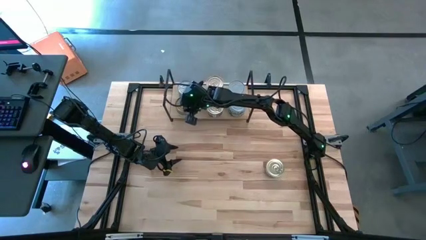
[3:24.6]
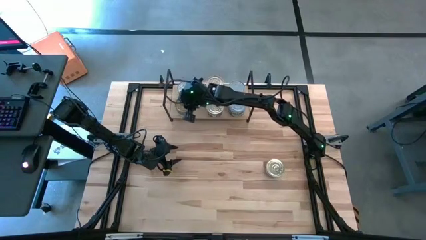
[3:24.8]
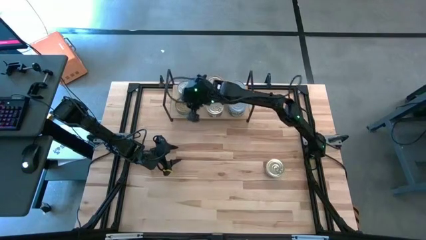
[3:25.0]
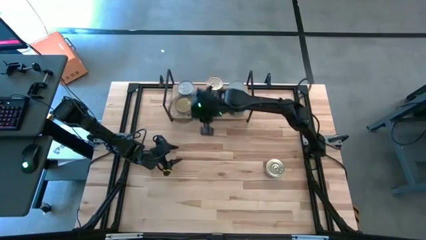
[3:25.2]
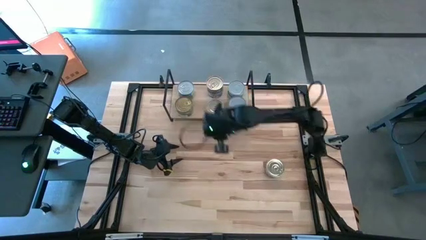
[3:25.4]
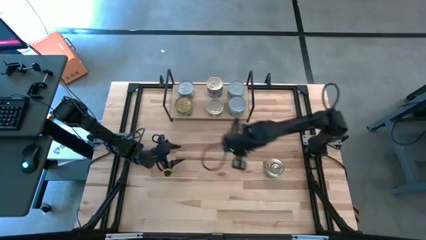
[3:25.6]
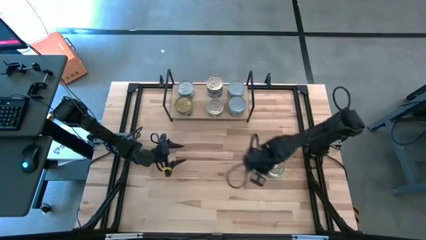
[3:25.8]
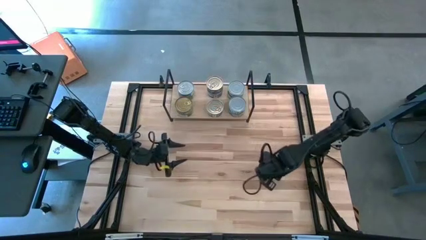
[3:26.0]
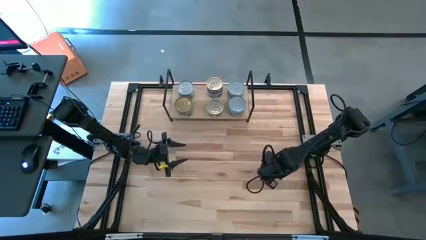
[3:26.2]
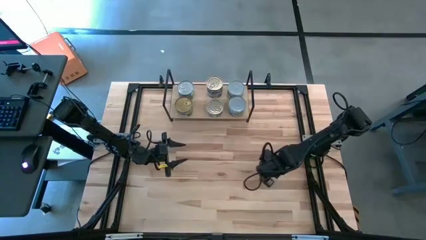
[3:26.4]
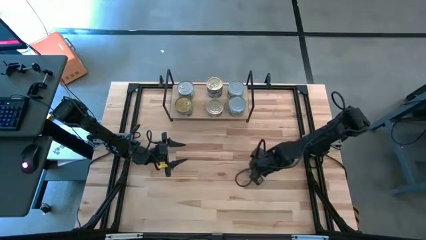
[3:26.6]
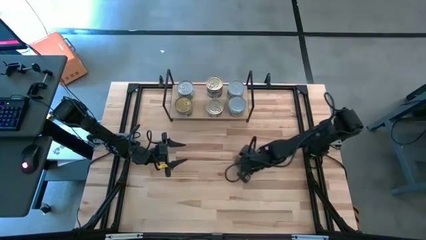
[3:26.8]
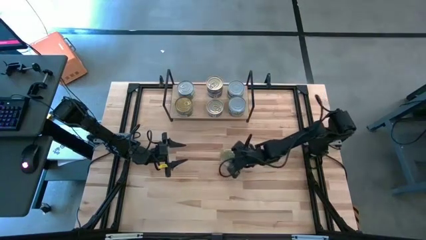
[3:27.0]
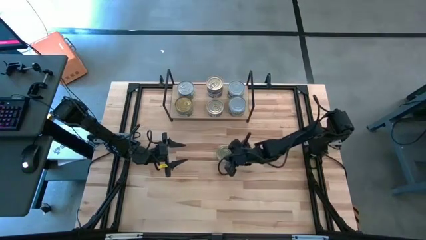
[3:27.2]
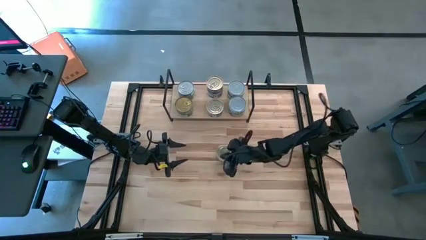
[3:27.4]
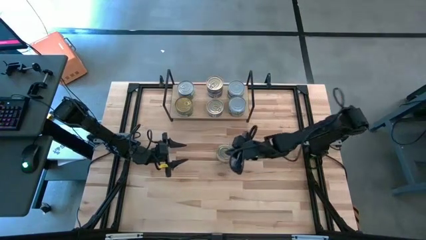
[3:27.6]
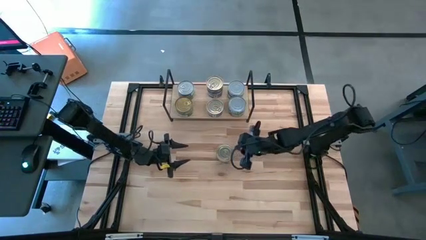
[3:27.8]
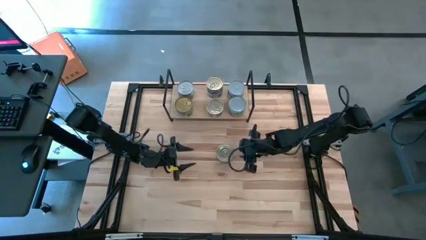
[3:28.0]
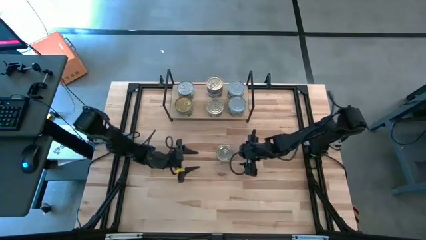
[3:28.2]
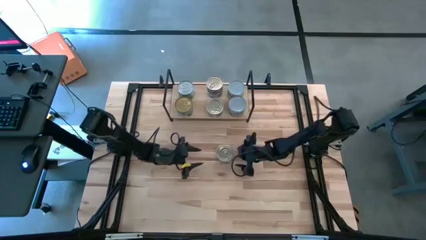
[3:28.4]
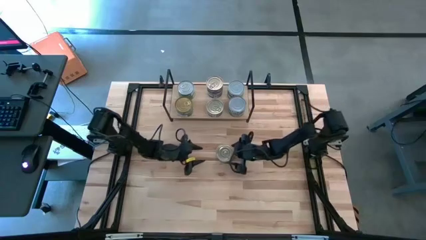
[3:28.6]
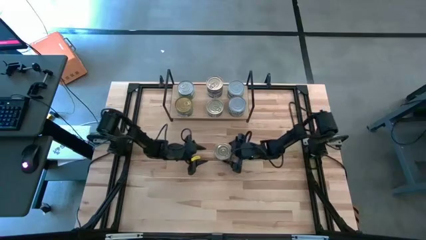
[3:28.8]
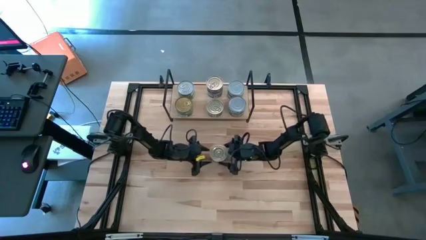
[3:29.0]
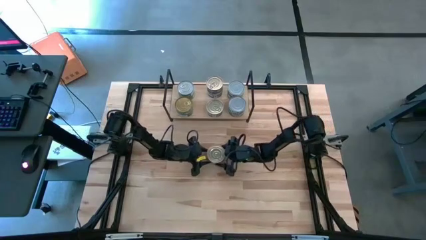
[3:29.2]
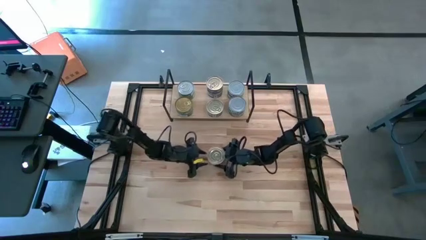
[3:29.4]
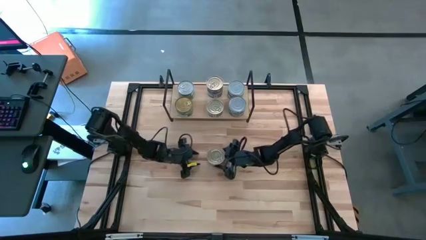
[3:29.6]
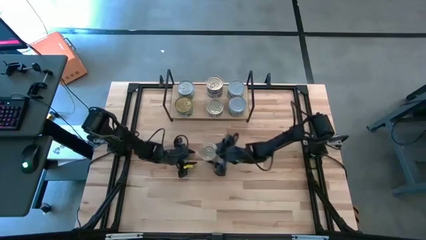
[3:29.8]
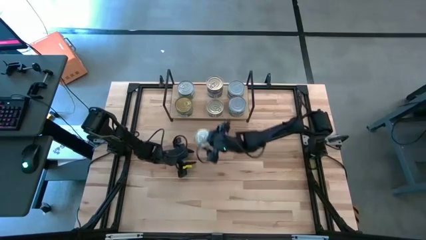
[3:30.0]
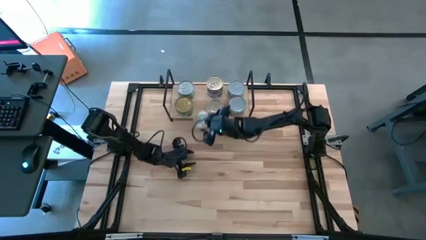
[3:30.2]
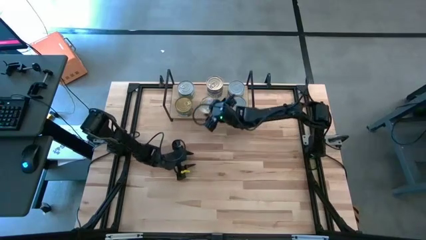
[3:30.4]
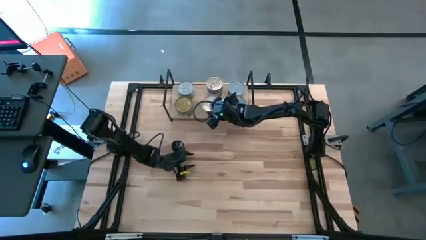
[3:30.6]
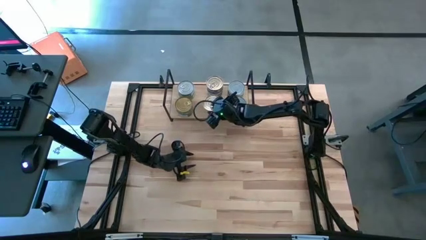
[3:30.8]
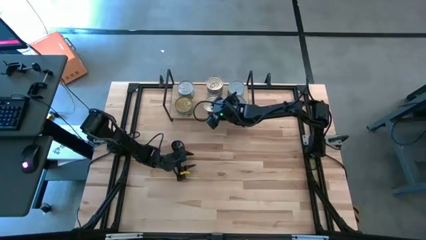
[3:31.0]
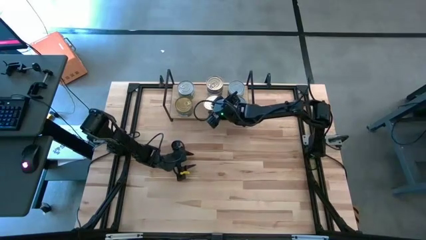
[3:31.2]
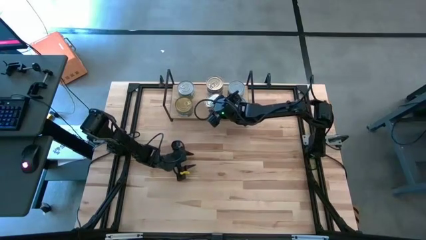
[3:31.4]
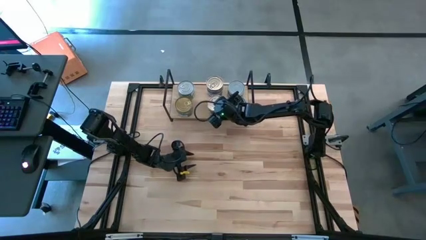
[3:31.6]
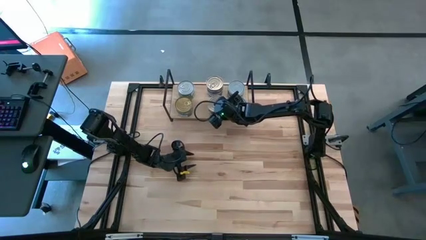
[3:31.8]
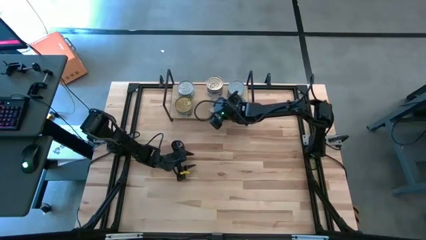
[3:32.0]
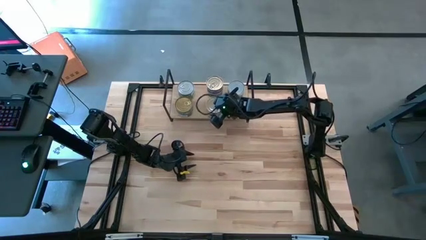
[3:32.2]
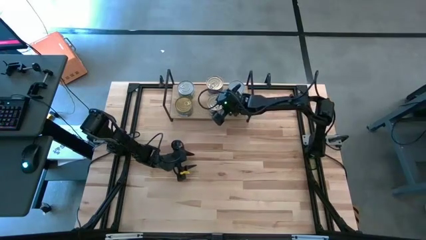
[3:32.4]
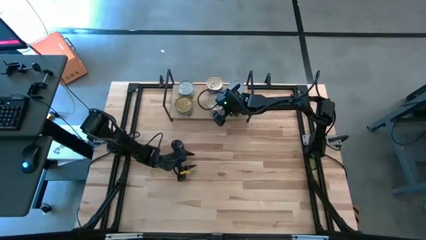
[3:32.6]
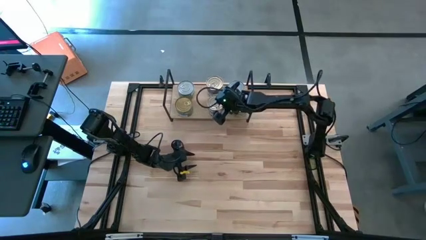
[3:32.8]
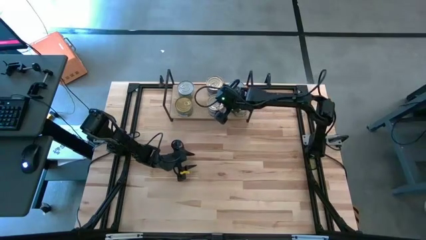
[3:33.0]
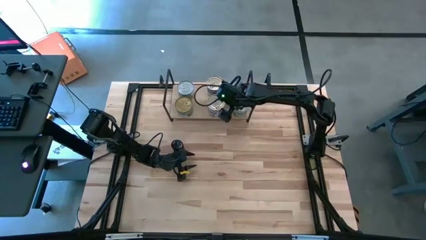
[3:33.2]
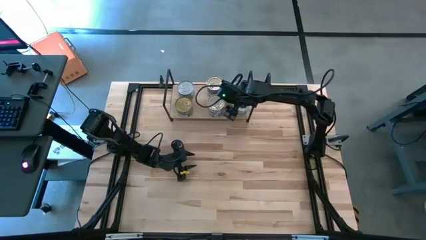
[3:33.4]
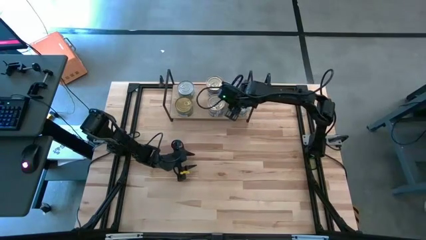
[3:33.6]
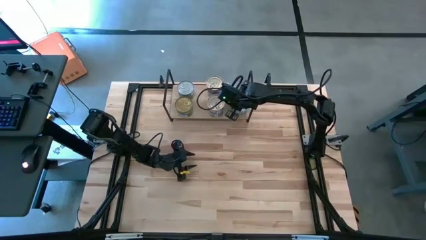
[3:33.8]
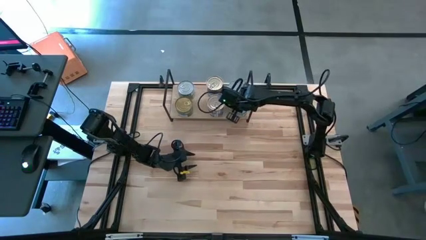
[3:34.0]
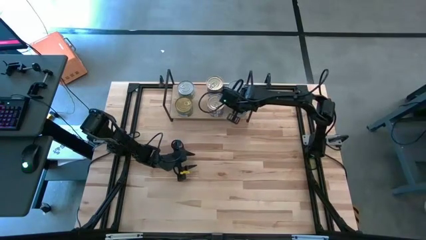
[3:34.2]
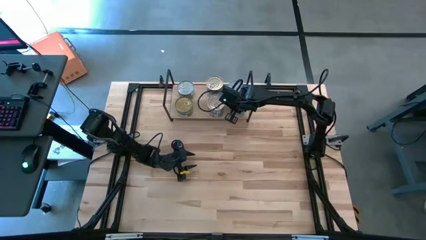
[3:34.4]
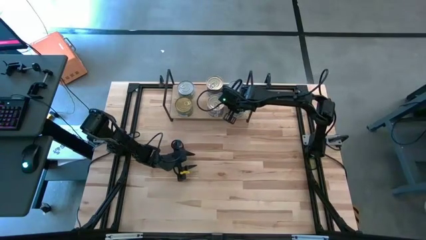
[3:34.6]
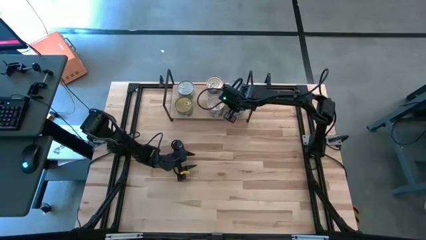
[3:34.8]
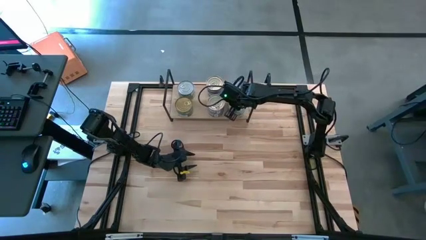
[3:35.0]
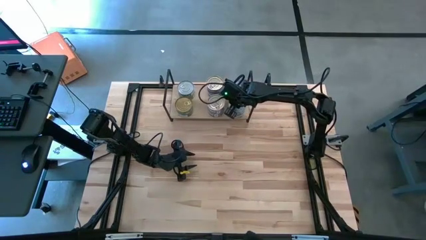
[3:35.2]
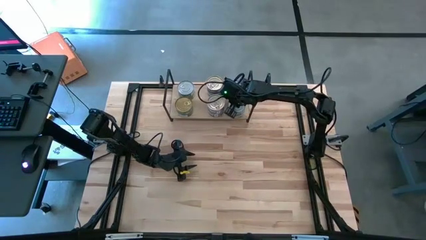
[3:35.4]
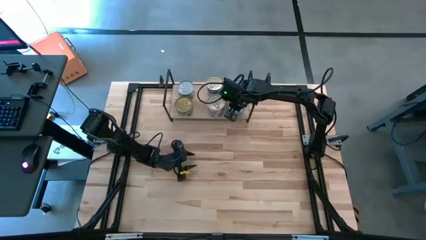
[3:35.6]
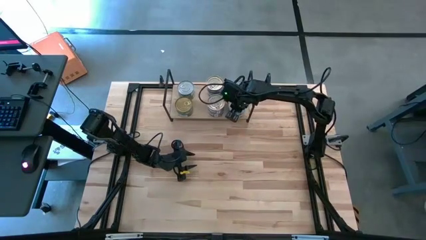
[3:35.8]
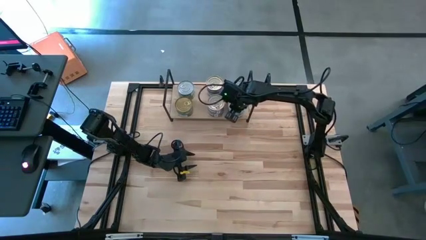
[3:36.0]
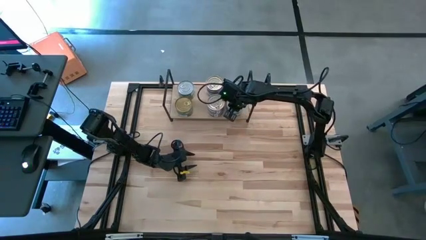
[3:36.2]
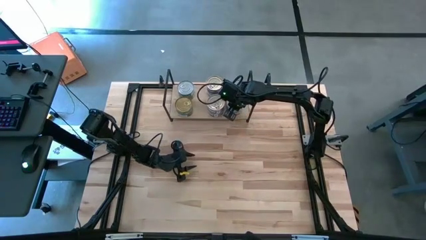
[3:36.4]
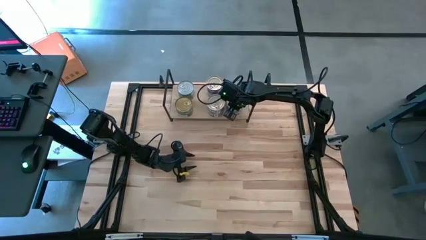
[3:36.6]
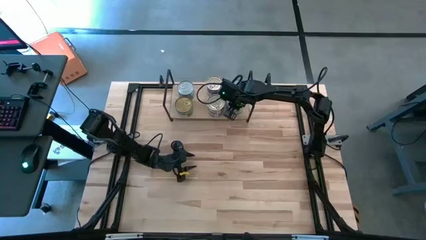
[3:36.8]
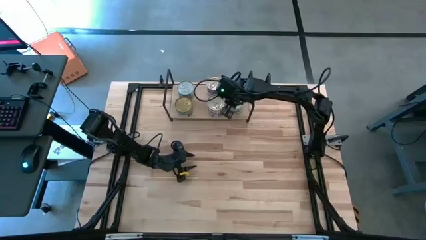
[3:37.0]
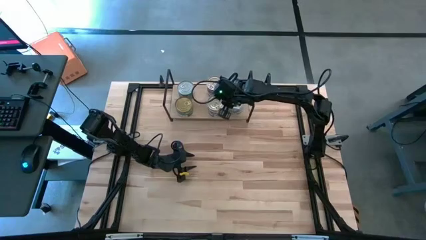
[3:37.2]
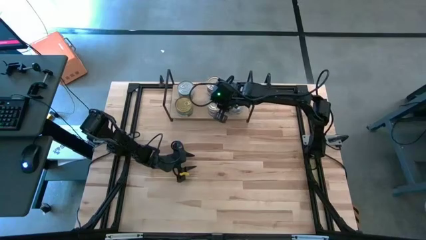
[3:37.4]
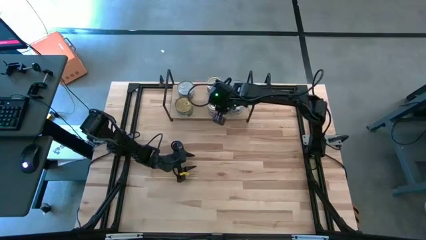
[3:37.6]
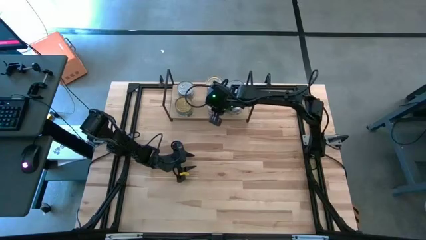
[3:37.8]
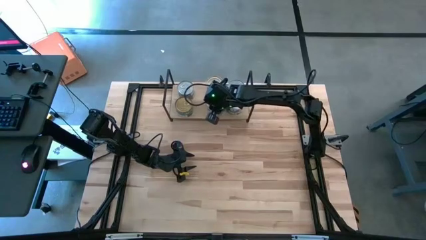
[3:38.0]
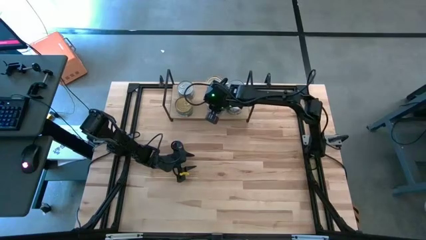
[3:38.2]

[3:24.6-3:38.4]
Task: Stack canned seafood by type on shelf
Stack the blue-pink tuna can on top of the blue-pink tuna can on the shelf
